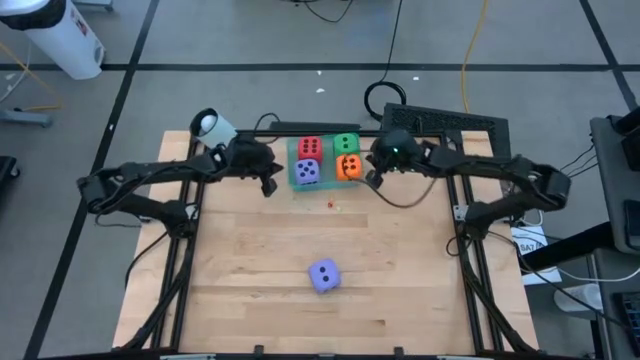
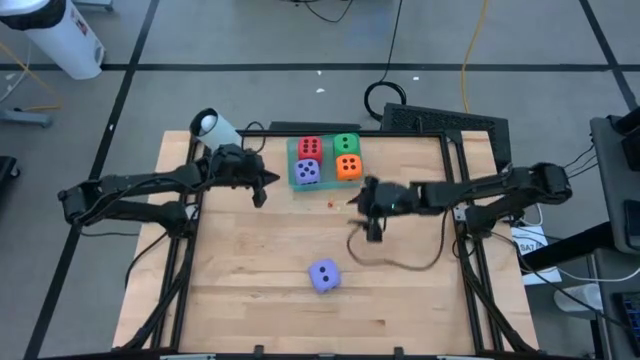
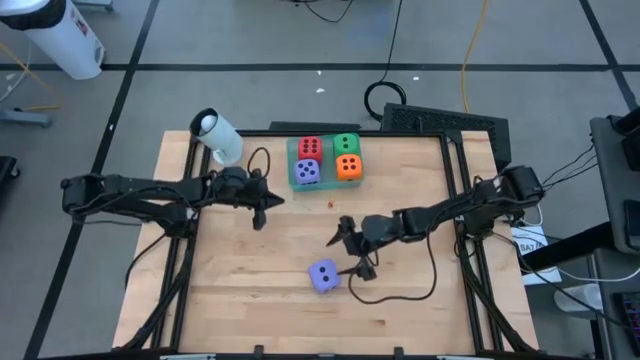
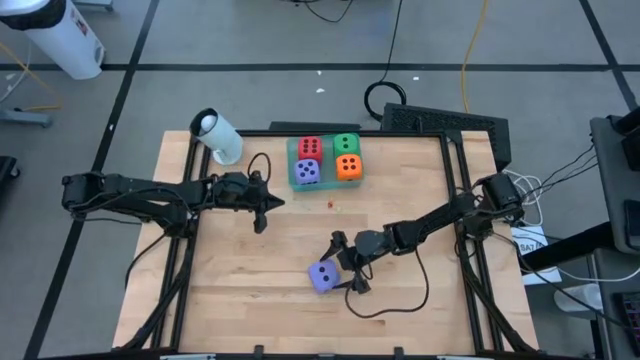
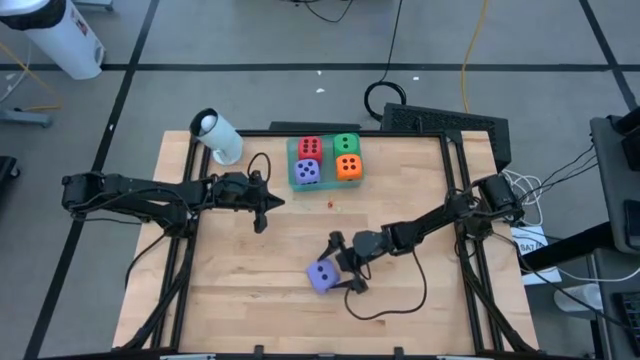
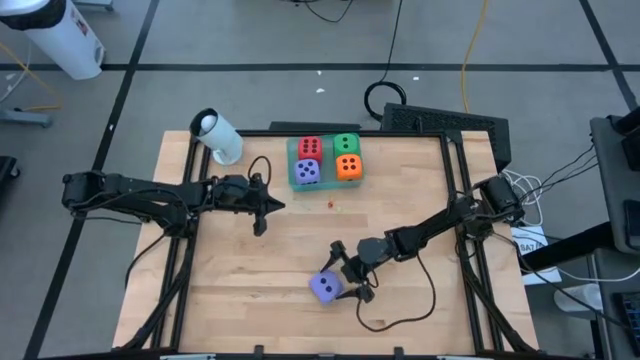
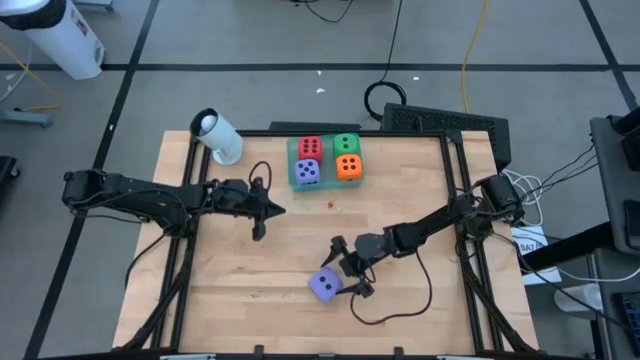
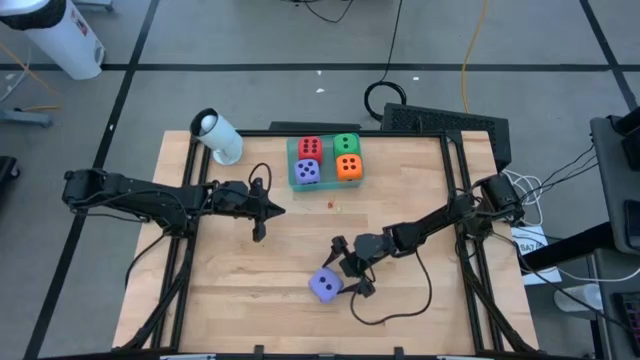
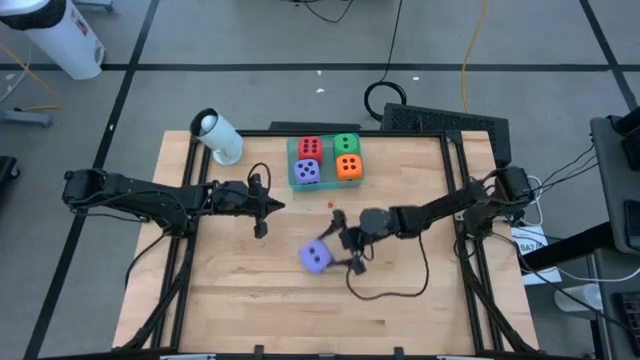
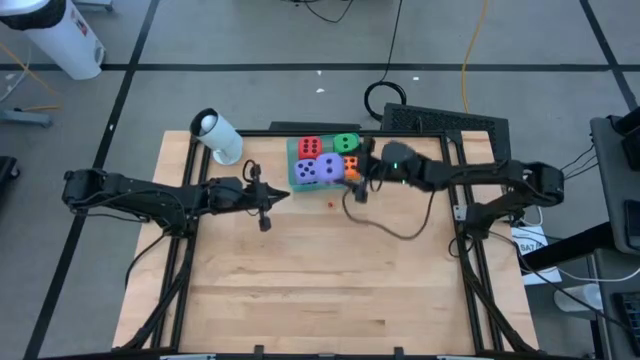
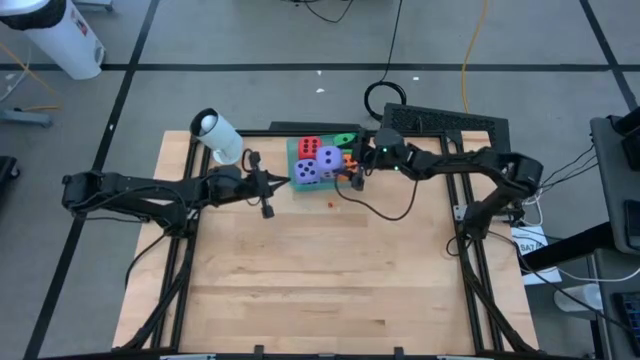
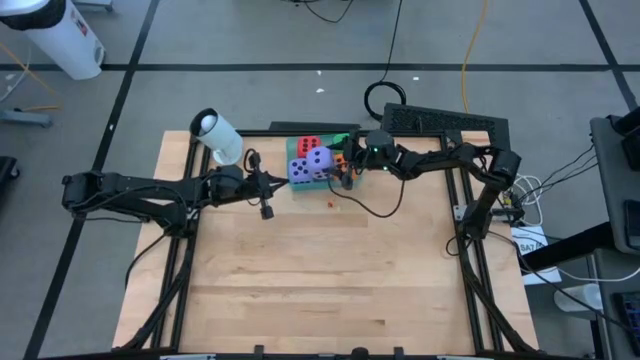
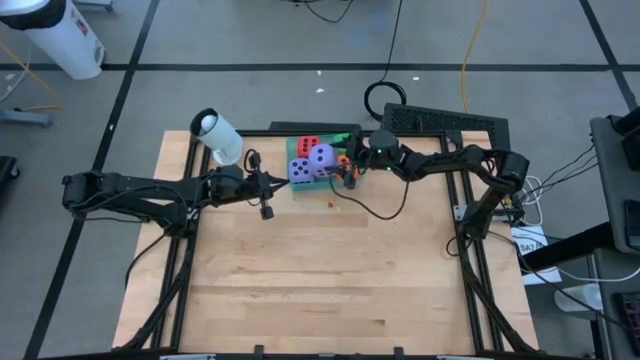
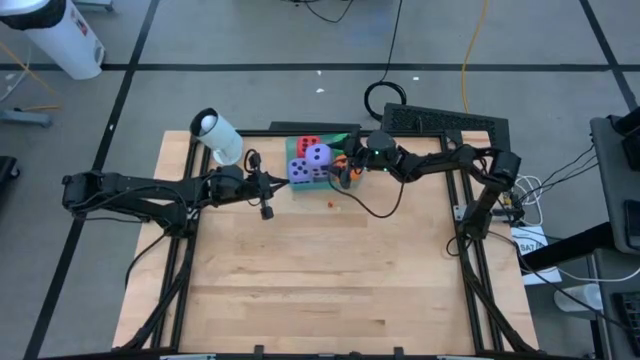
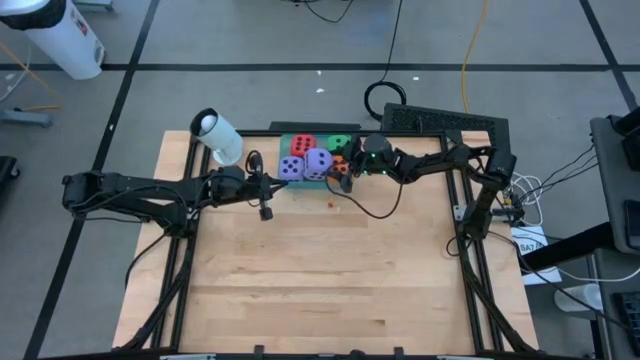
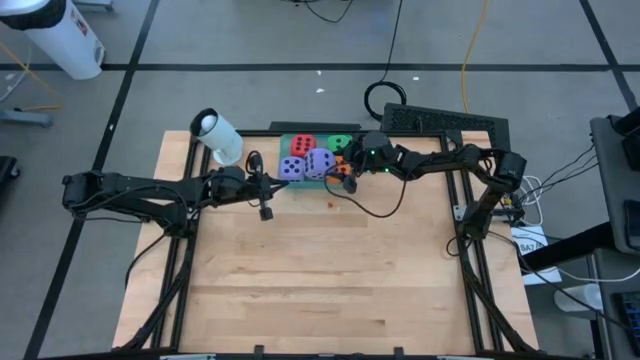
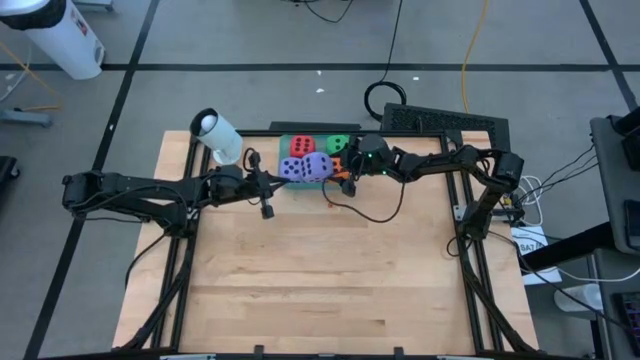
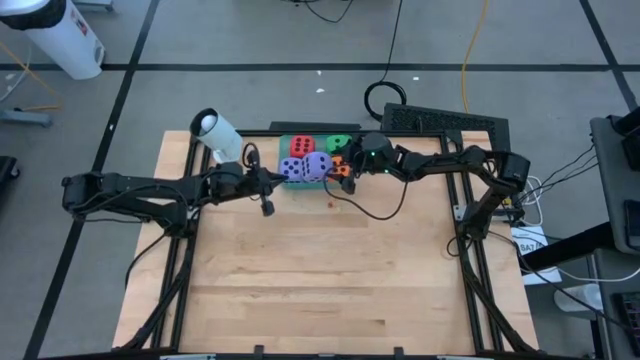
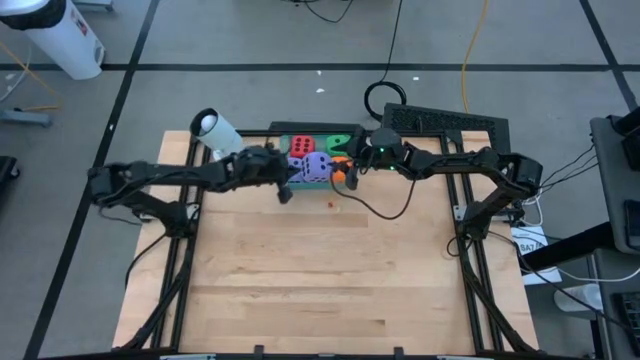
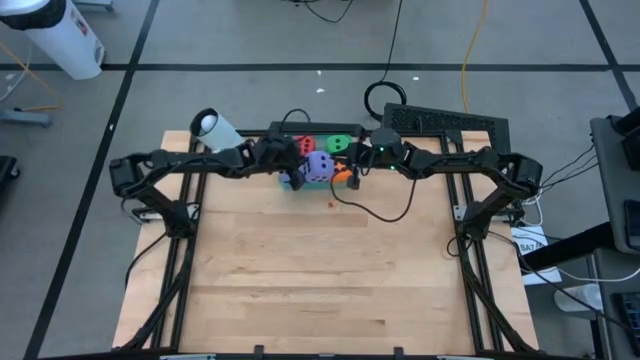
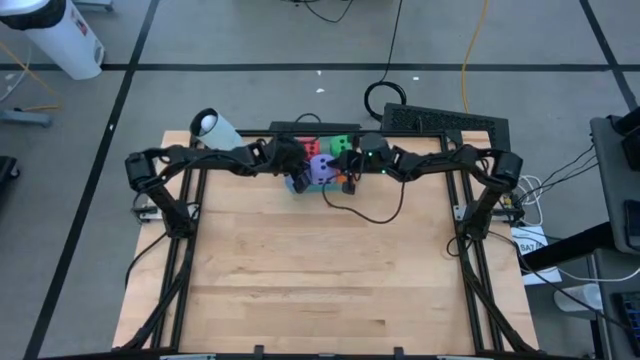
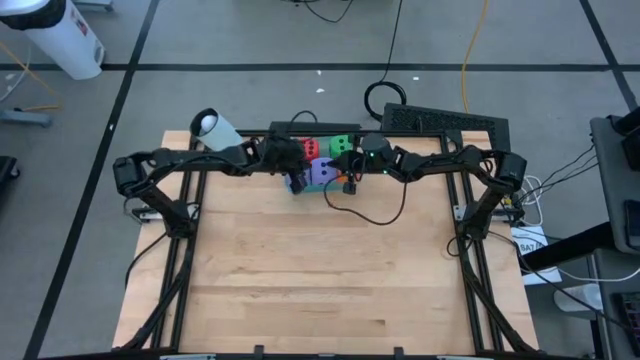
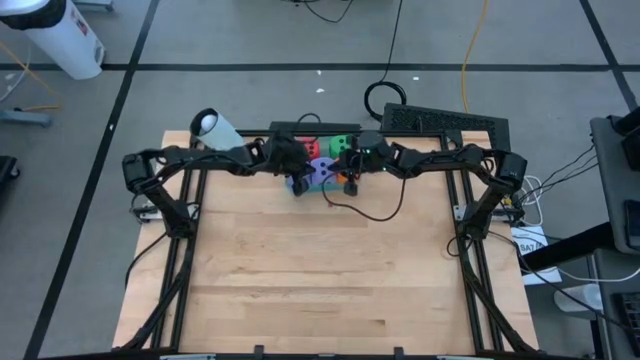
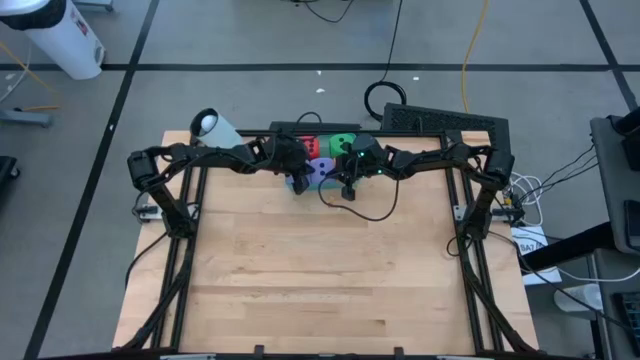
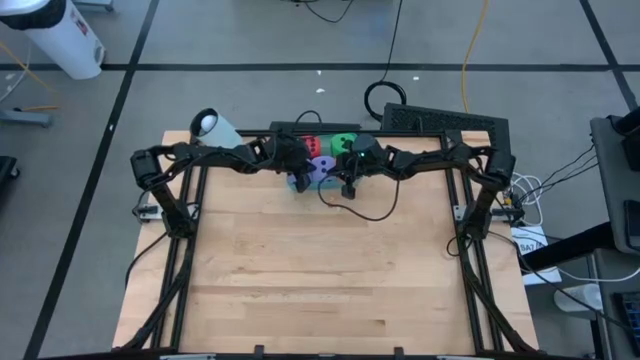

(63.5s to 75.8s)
Task: Pick & Place Dice
Put the violet die into the blue bin

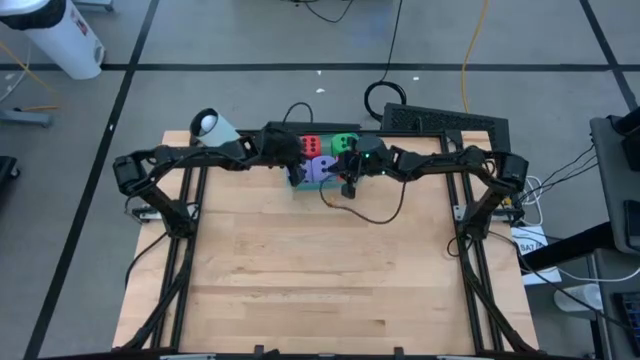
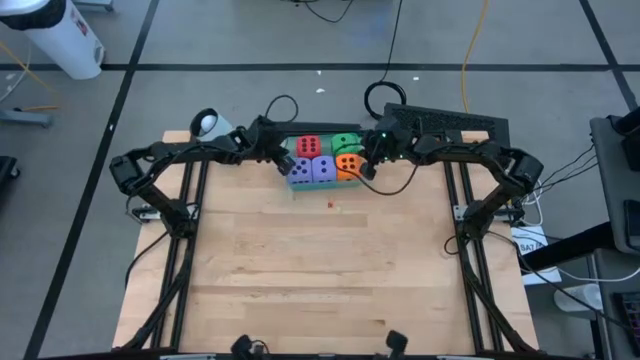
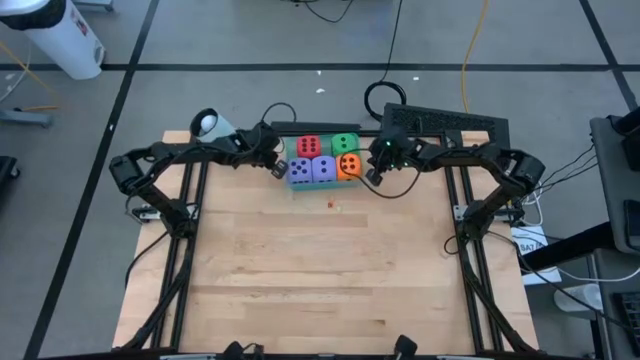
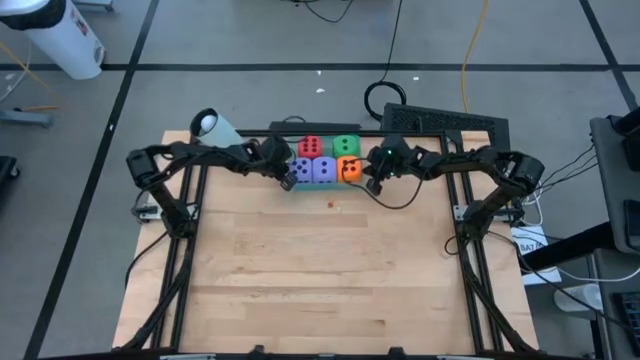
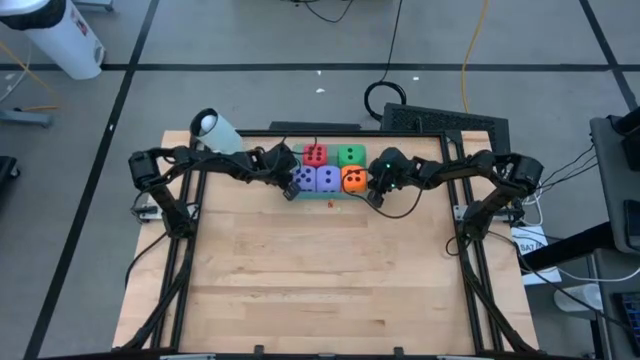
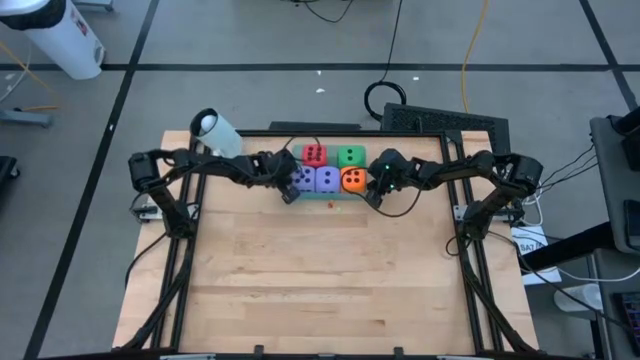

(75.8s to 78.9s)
Adjust the blue bin

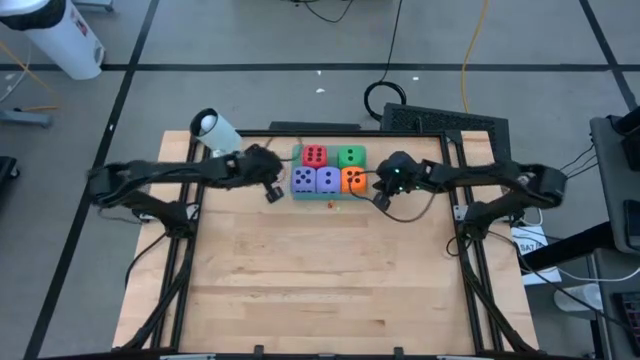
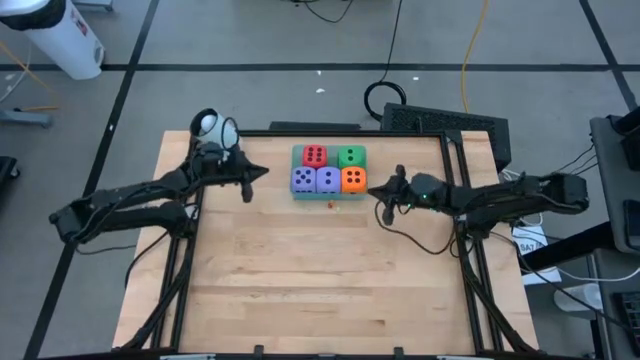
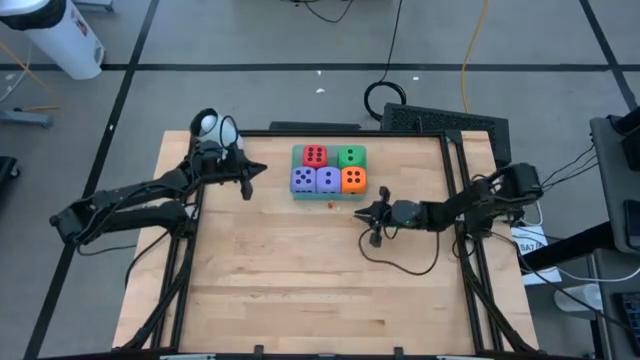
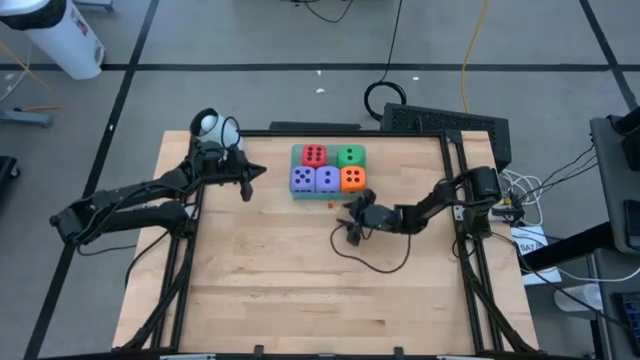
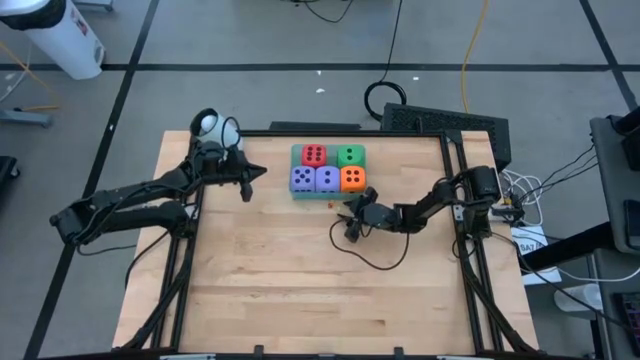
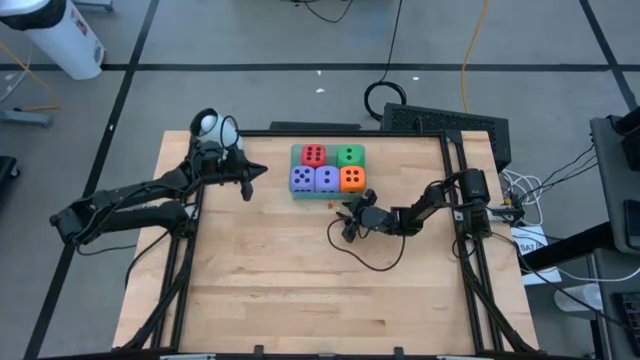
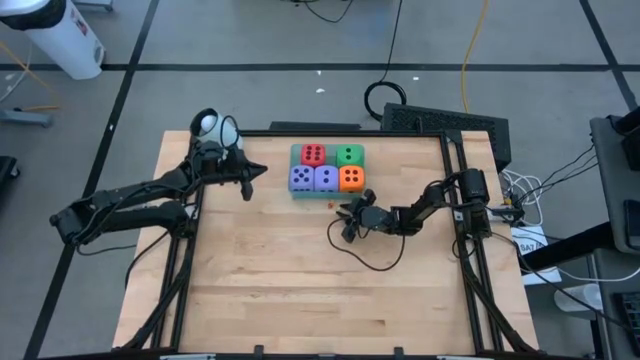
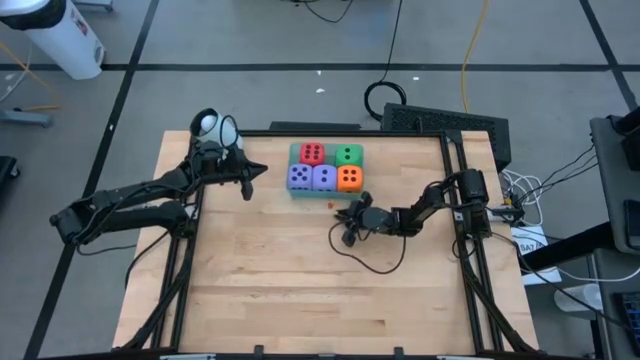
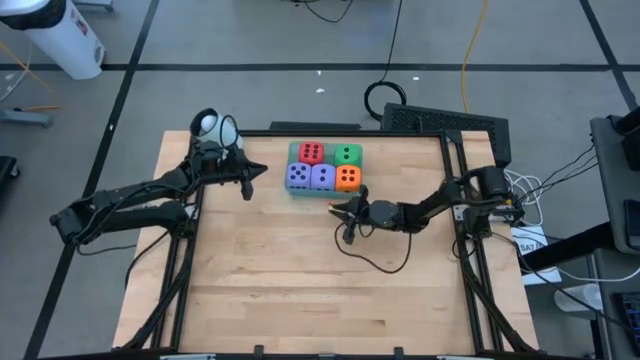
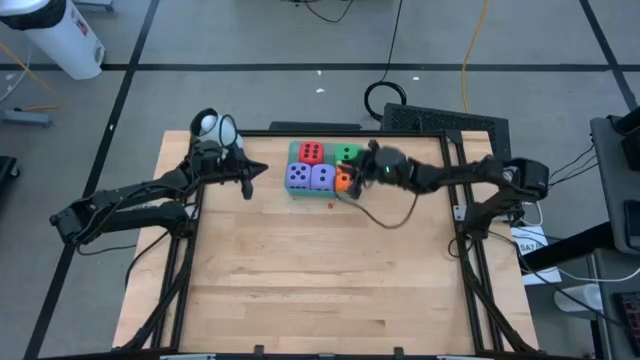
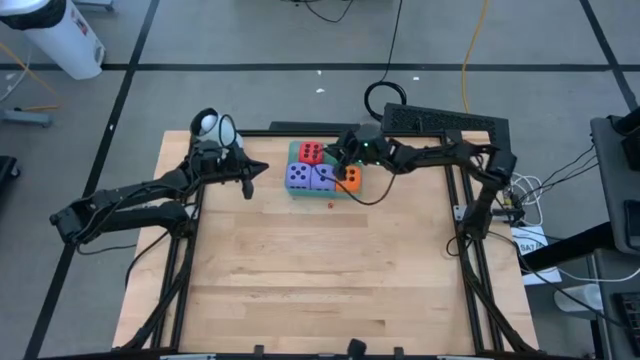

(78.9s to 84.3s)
Put the small green die into the blue bin
